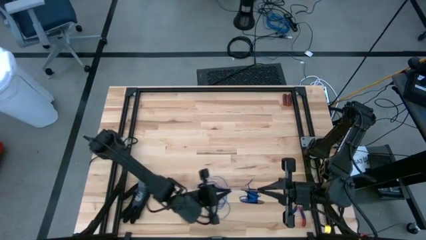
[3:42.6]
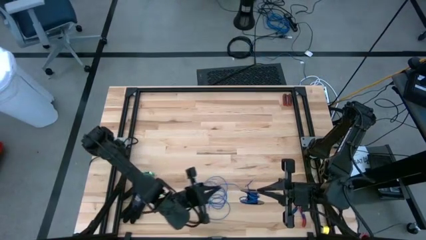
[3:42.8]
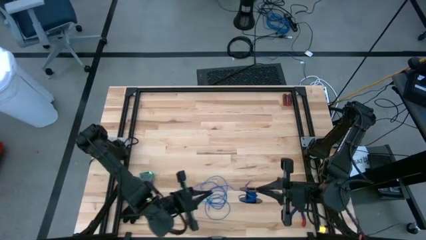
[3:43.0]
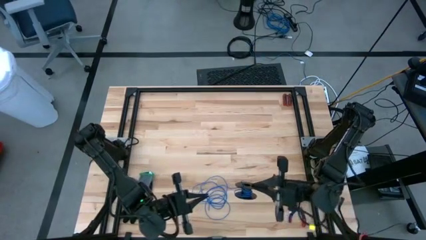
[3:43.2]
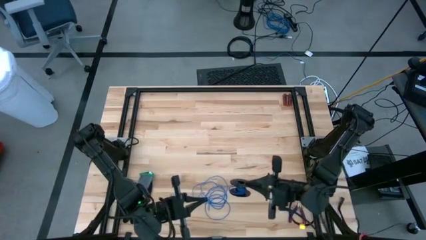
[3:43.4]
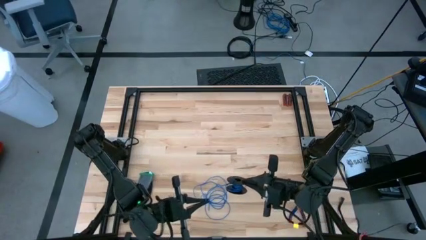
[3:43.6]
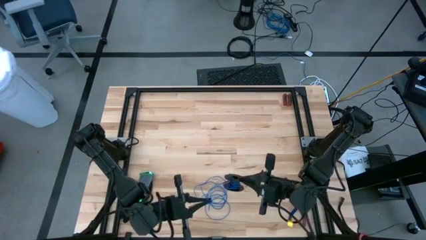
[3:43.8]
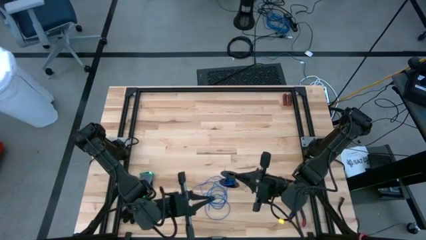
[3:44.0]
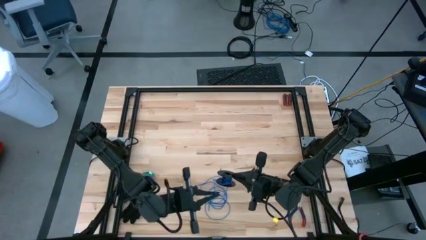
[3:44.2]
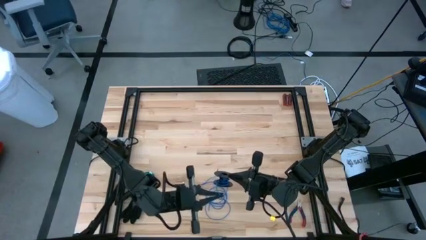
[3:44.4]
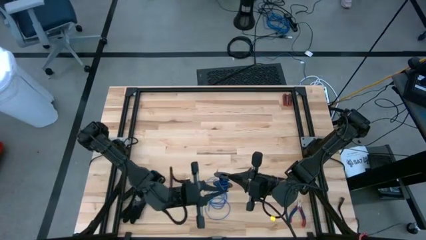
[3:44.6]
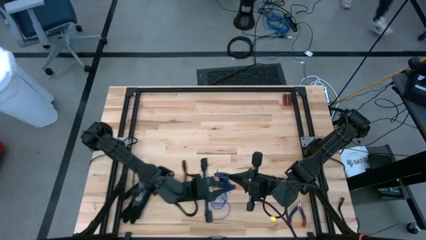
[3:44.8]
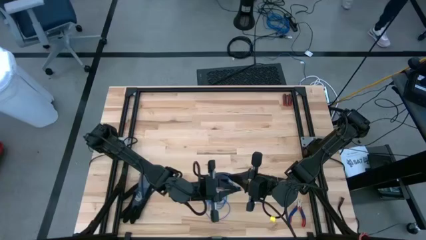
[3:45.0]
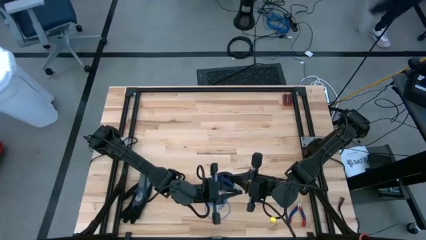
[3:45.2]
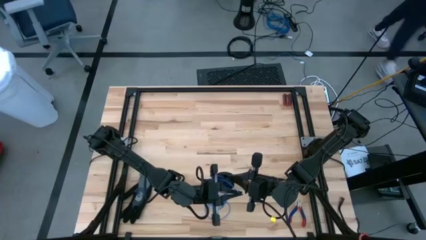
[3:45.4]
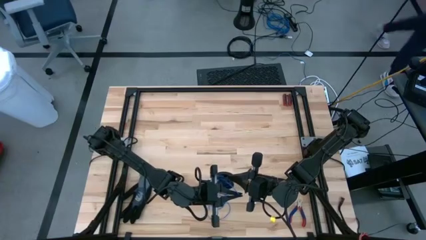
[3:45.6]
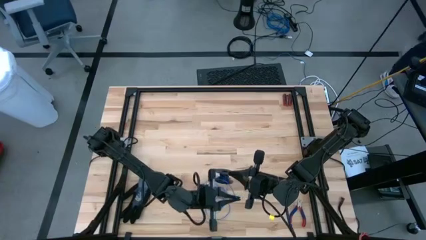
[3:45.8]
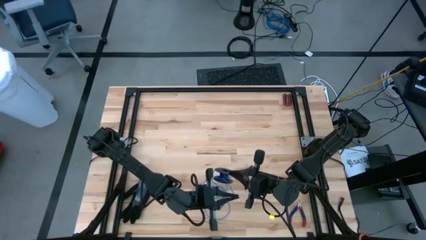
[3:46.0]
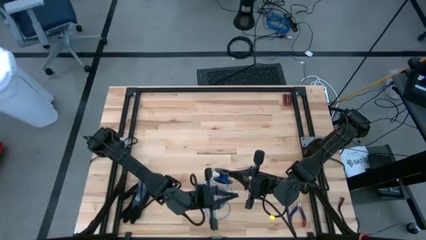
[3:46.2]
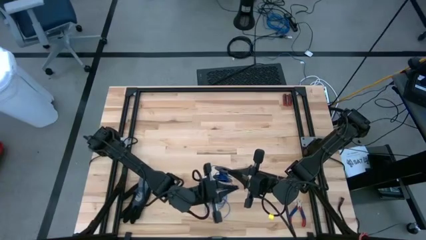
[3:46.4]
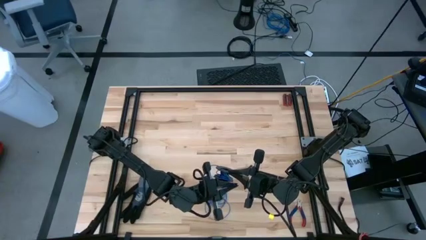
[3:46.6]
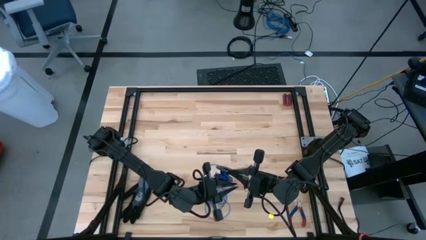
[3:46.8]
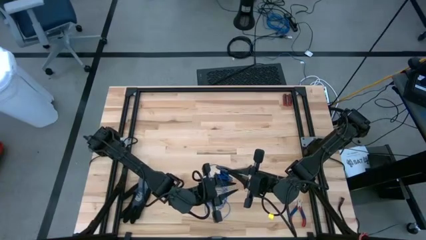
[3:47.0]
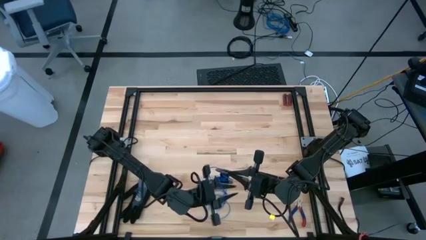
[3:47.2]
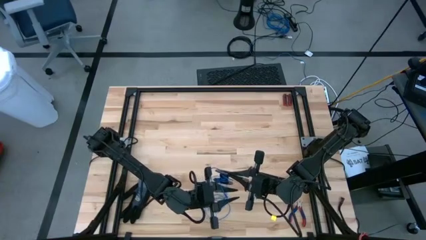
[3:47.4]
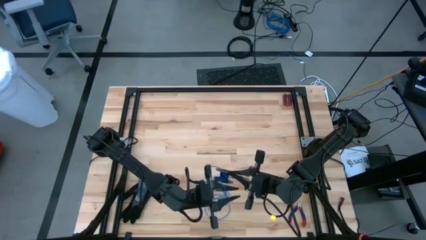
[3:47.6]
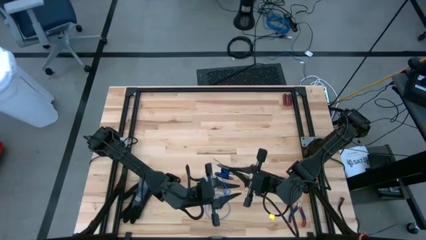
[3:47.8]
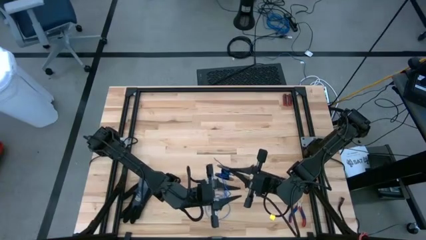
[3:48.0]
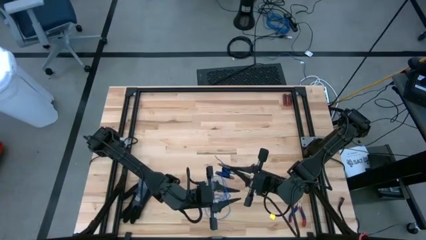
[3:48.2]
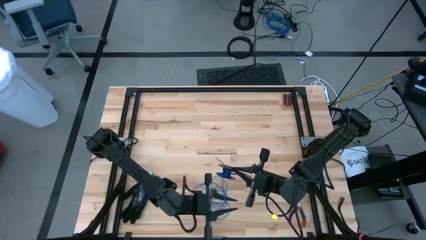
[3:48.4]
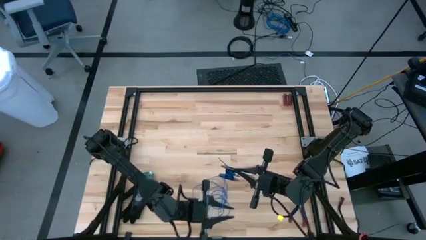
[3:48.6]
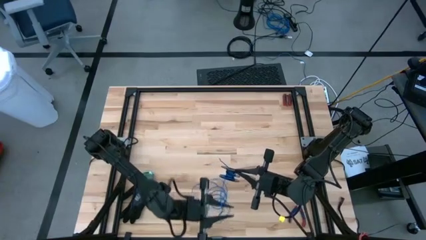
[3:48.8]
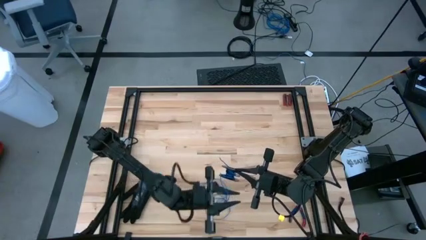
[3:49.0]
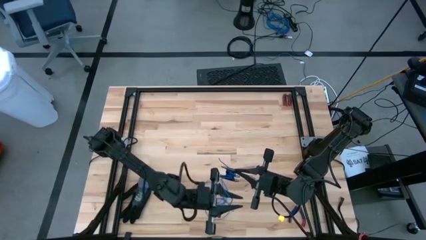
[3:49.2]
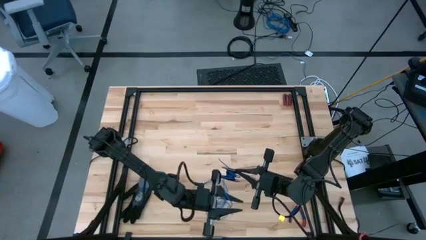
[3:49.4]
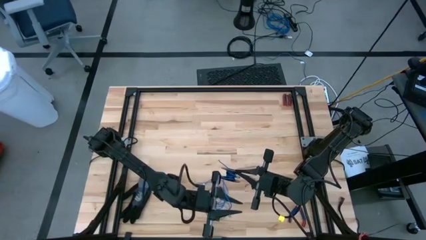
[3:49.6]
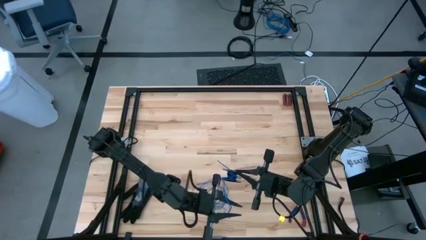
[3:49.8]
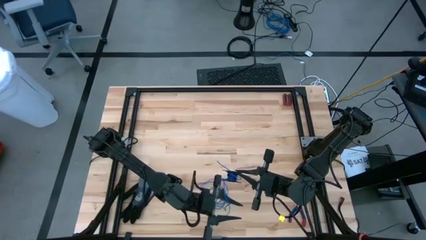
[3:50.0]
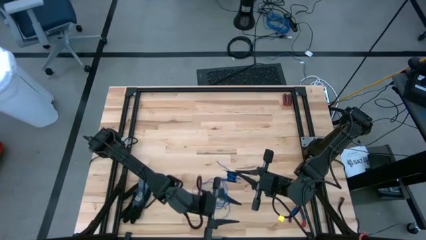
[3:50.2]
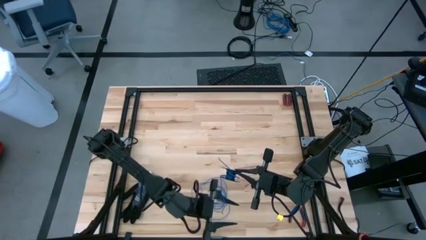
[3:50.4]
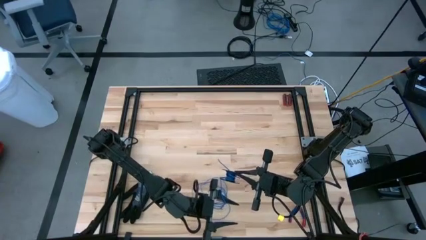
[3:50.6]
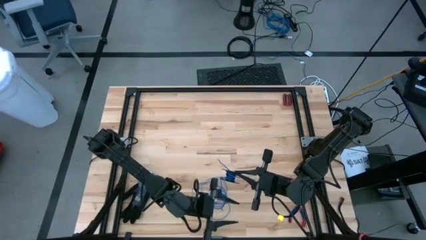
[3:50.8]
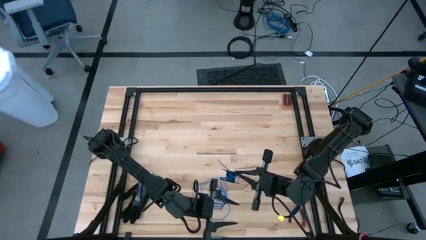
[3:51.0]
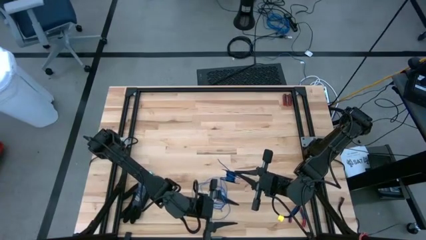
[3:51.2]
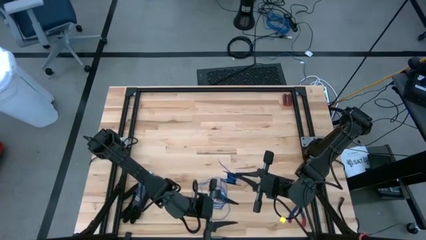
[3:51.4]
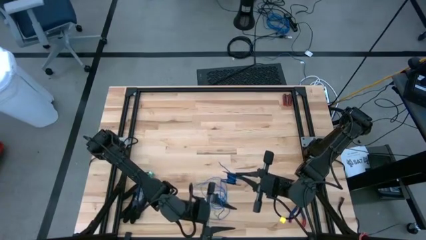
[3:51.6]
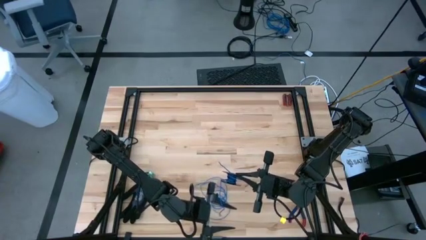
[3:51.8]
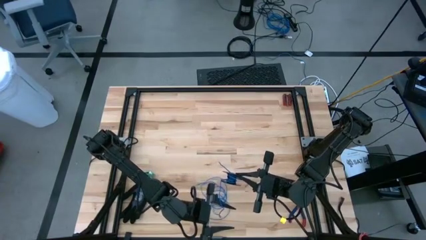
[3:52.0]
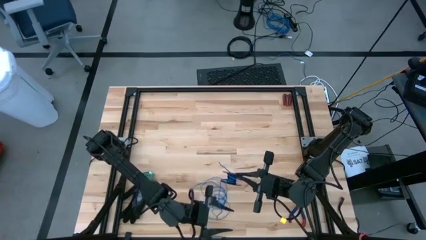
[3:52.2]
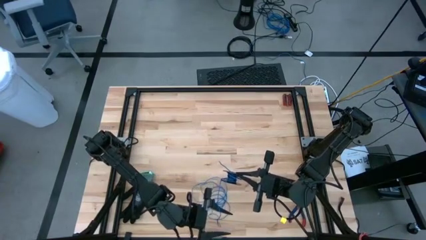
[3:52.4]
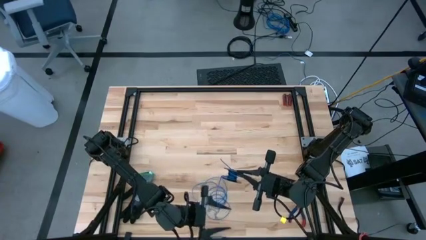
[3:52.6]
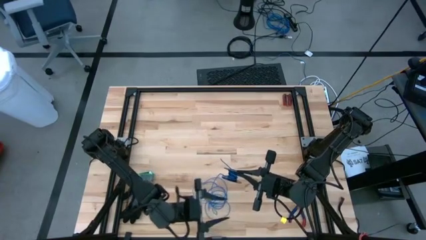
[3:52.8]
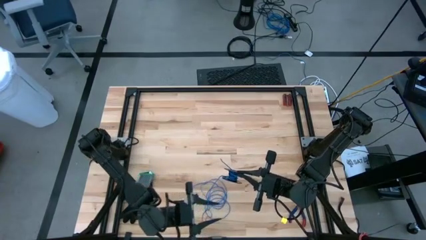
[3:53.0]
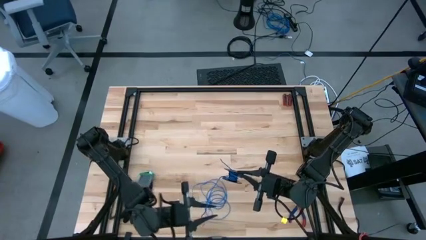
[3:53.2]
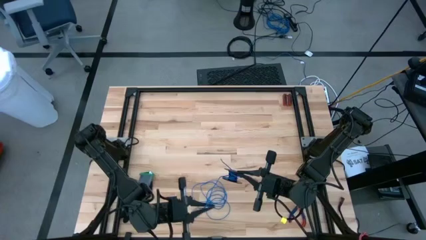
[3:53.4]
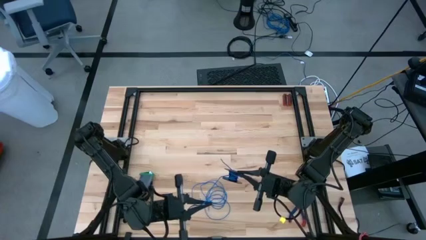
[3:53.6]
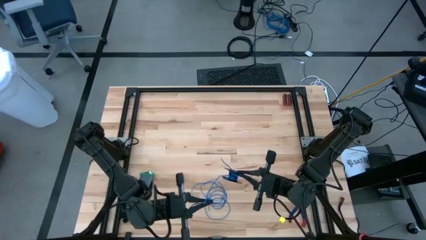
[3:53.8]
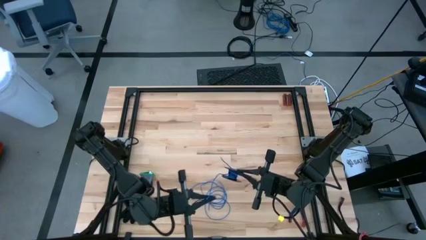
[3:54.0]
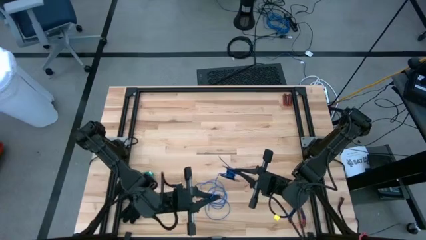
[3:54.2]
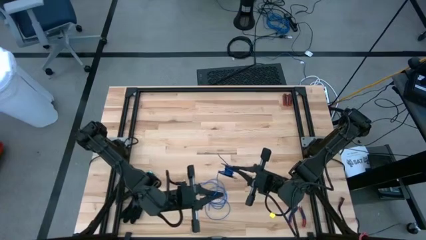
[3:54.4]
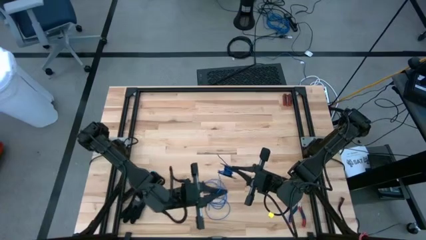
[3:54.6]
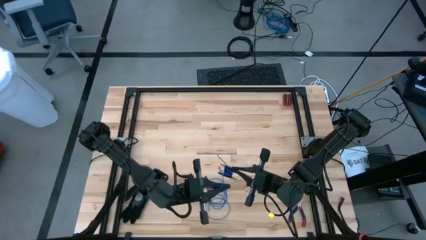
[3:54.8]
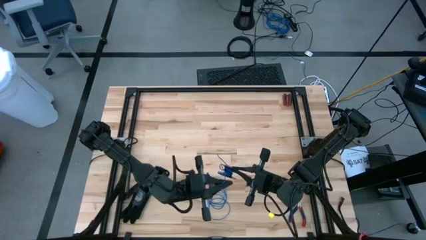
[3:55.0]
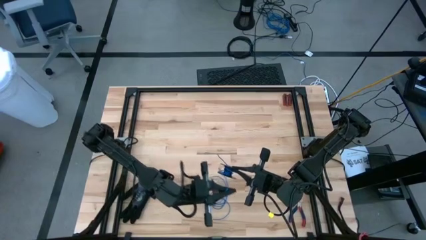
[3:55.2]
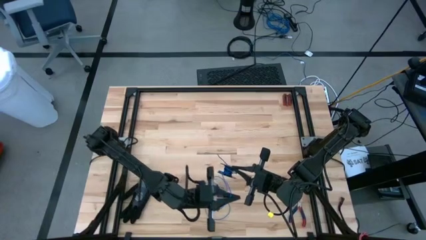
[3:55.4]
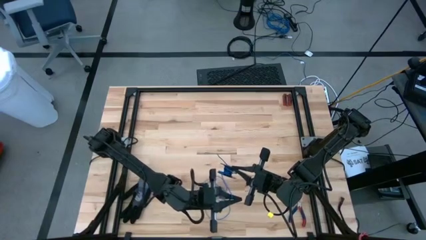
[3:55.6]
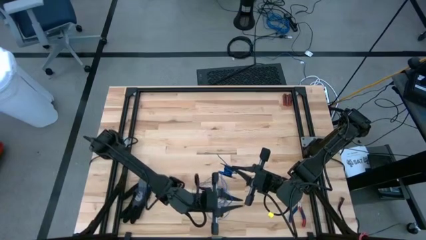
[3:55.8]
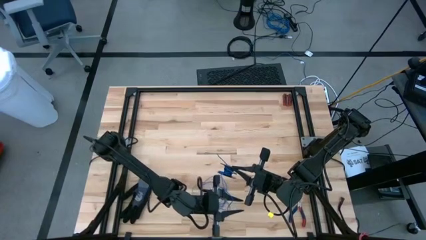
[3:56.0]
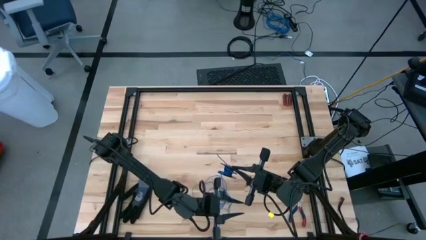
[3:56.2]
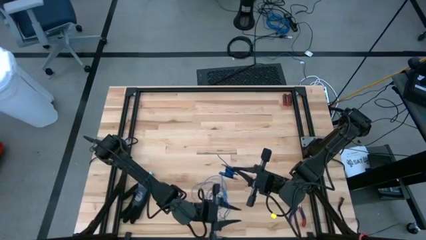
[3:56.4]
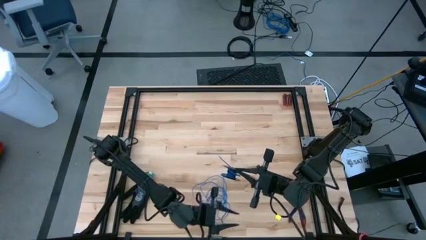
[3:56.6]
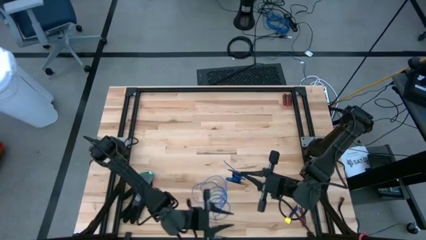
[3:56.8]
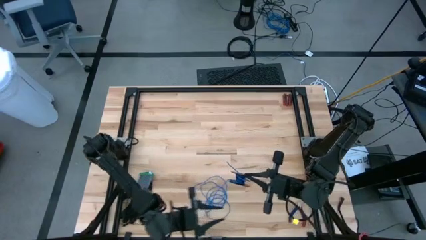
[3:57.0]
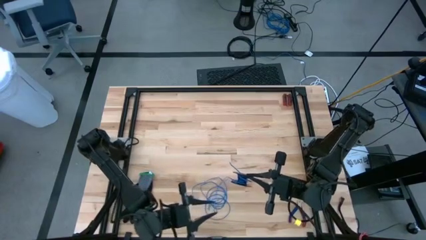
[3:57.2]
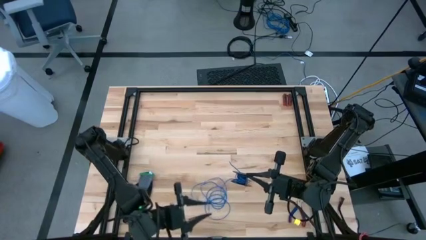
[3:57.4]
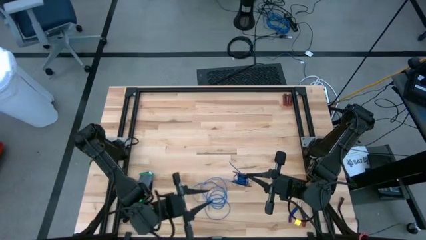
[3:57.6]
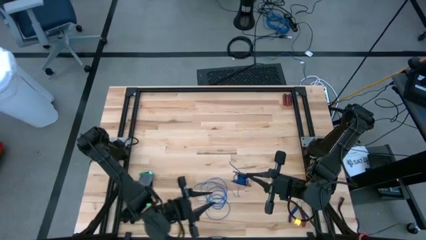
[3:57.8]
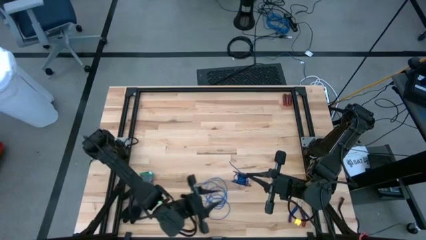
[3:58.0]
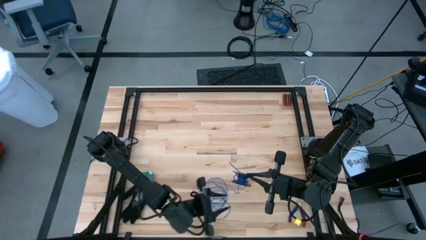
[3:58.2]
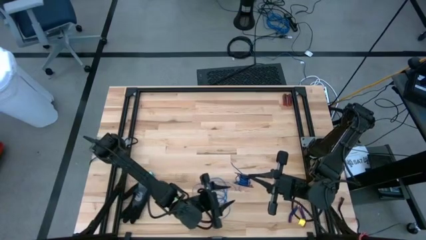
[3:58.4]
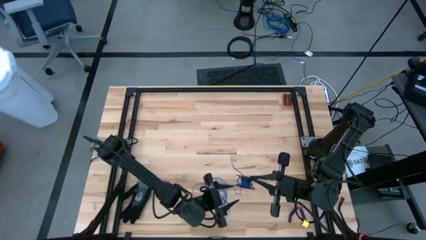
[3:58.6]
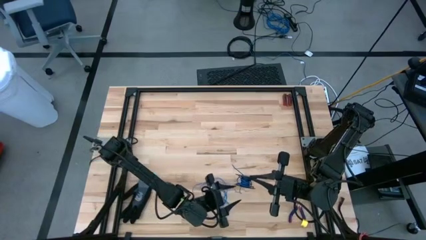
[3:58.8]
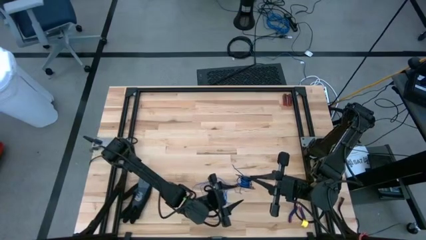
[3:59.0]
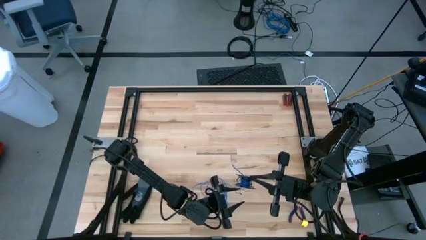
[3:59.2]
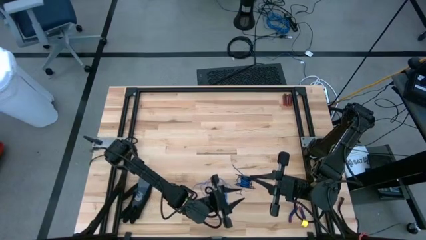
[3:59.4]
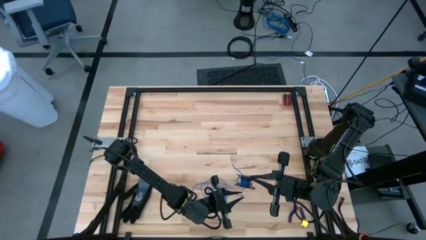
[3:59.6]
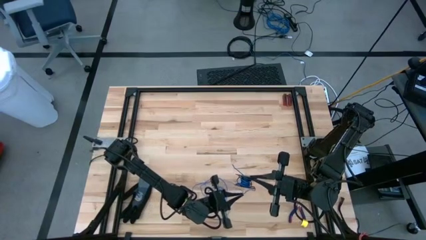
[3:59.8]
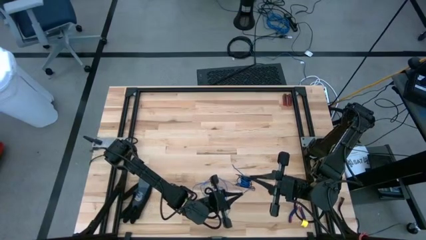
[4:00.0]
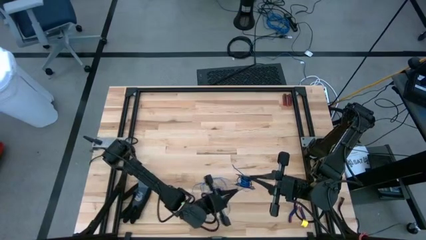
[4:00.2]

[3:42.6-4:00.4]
Task: Coil cords
Coil the blue wire onto the spool
